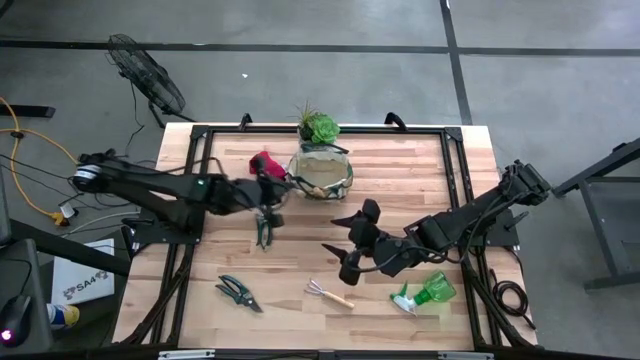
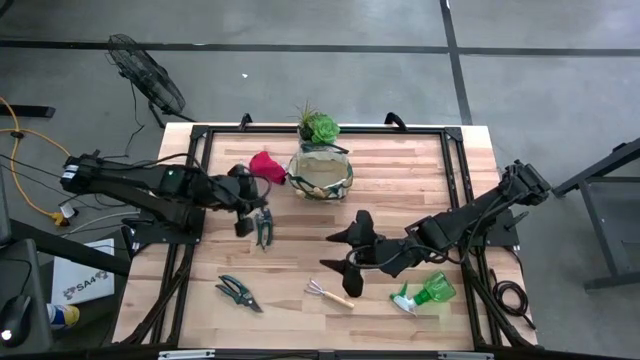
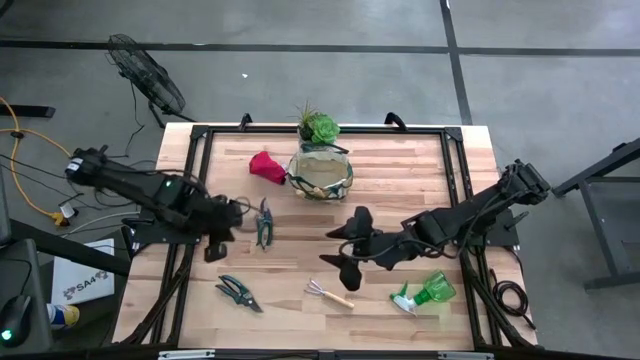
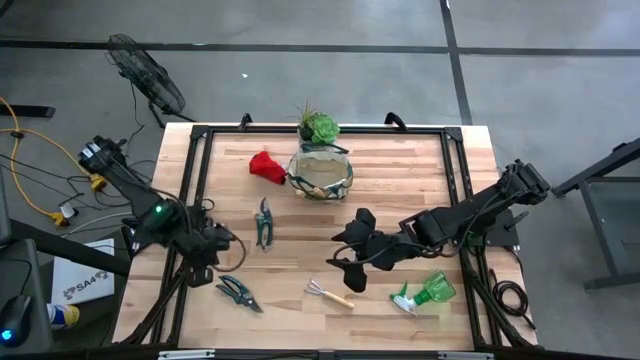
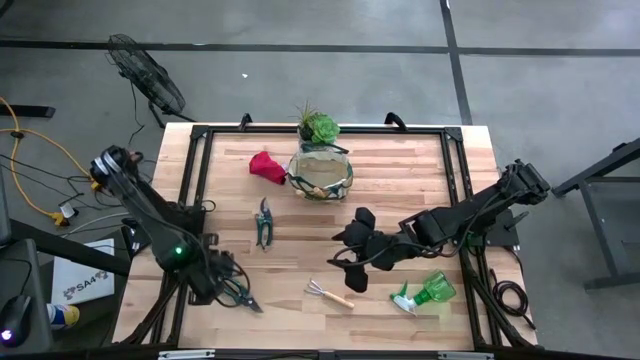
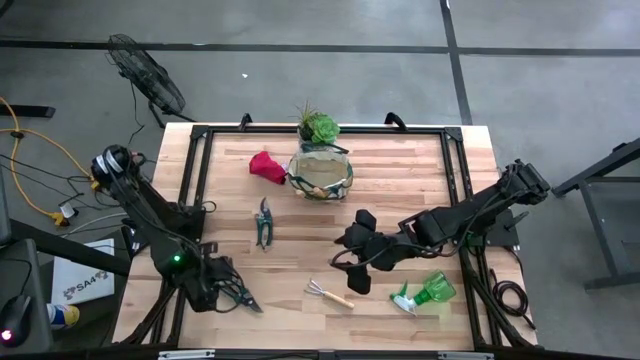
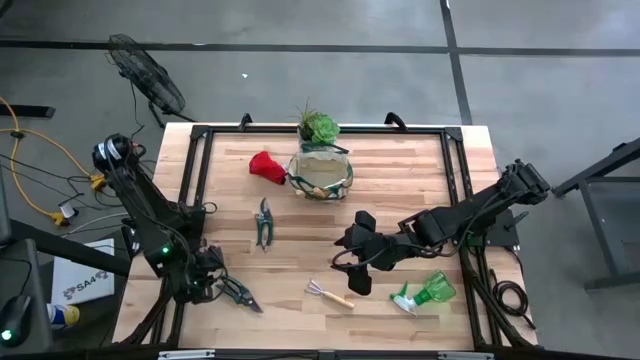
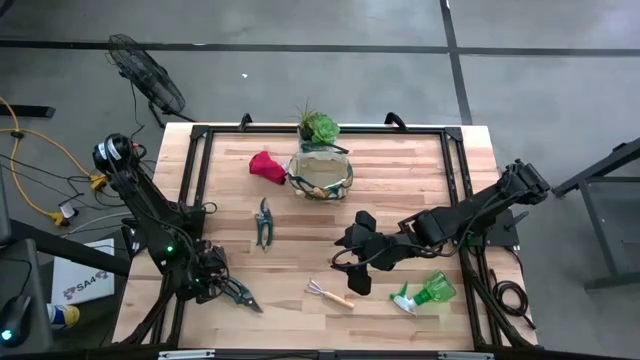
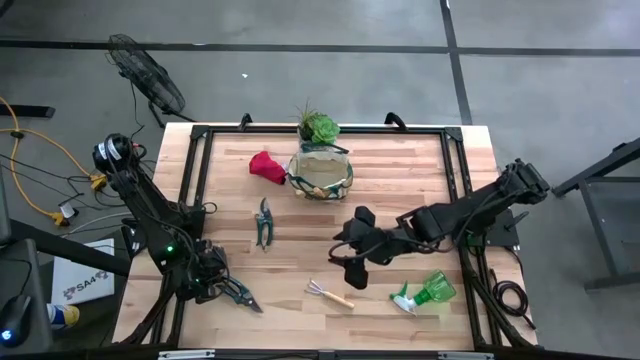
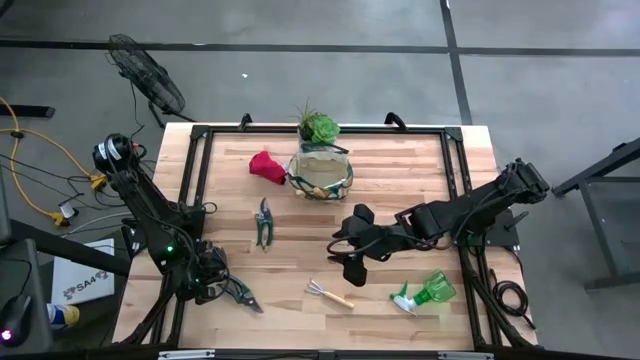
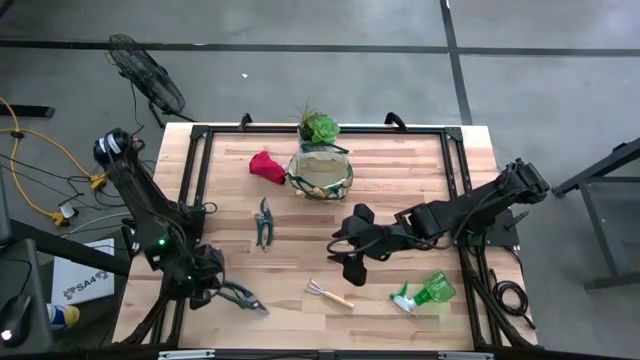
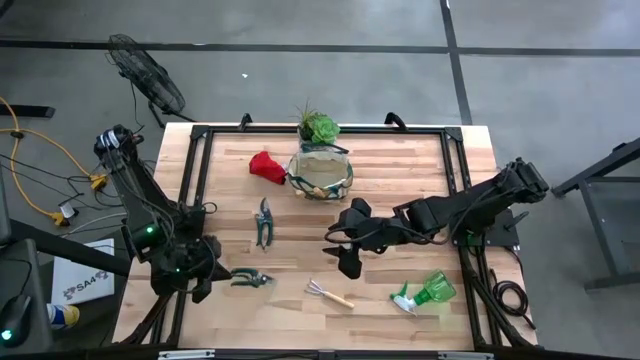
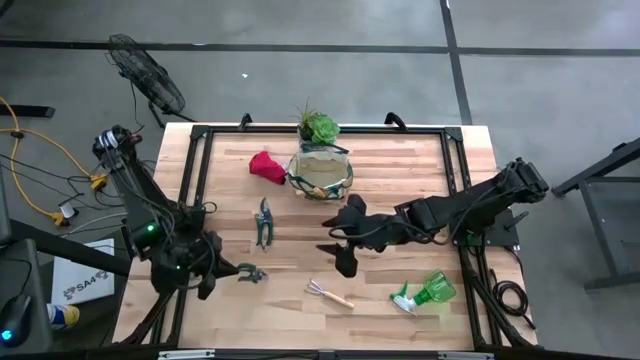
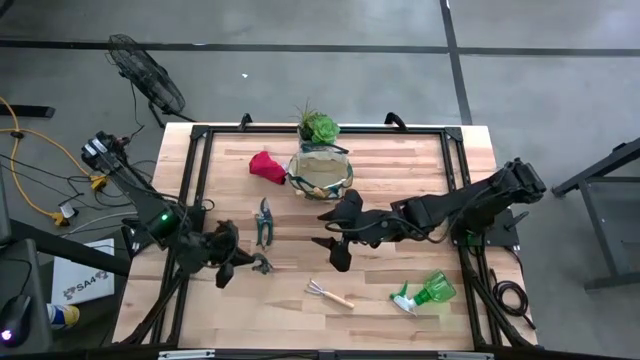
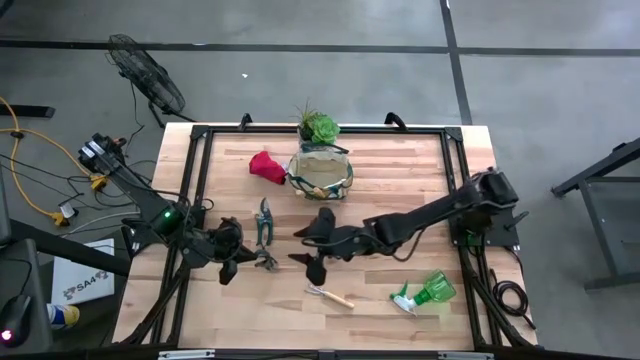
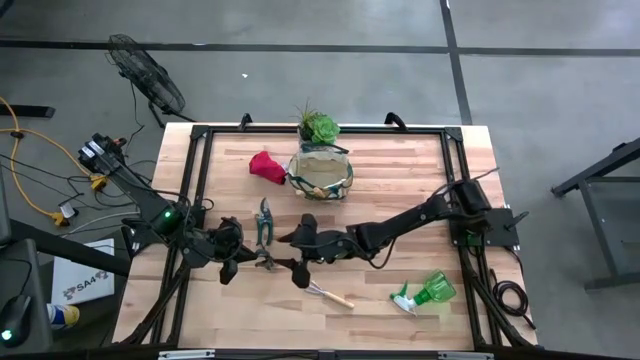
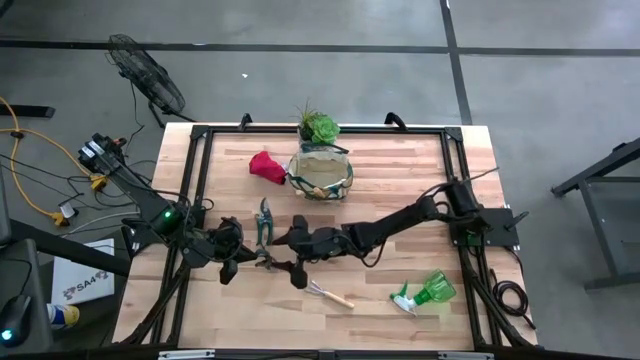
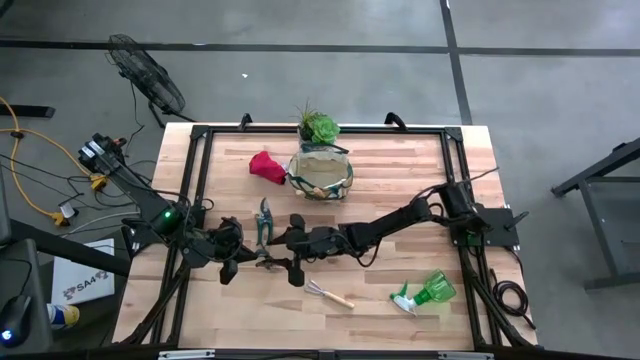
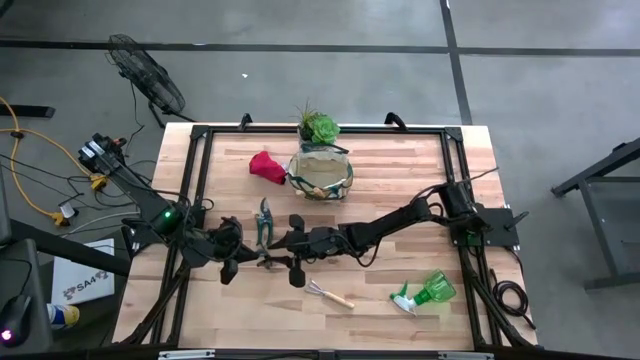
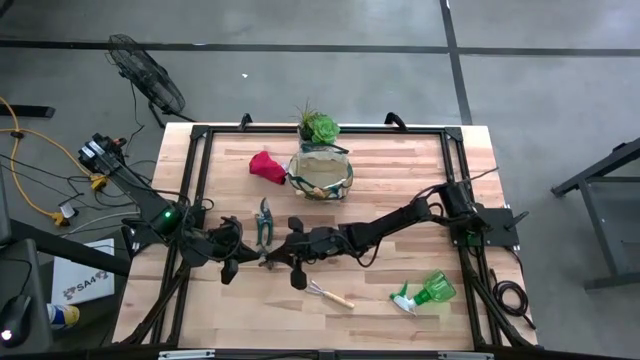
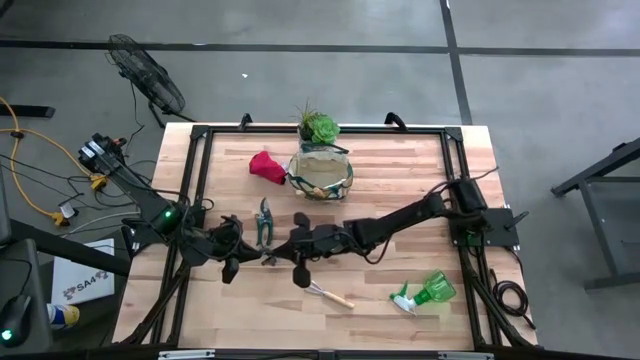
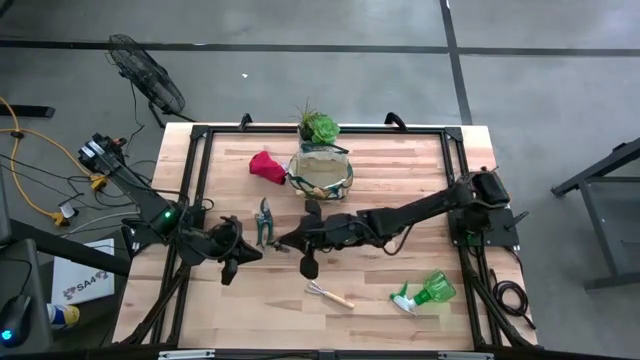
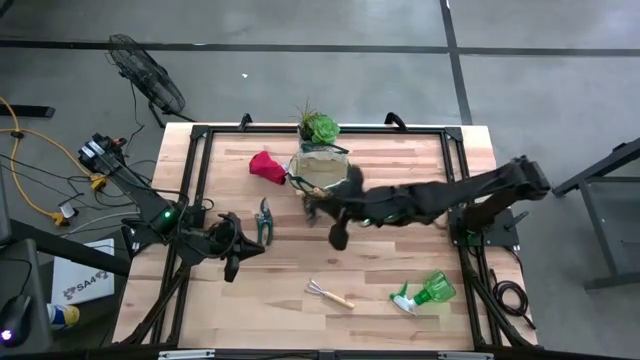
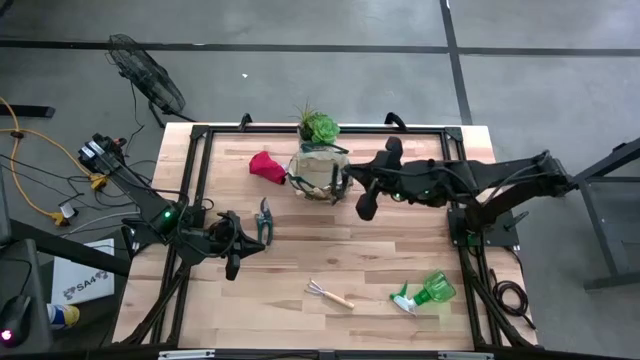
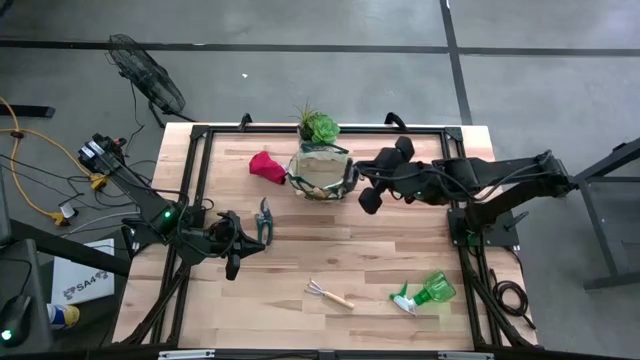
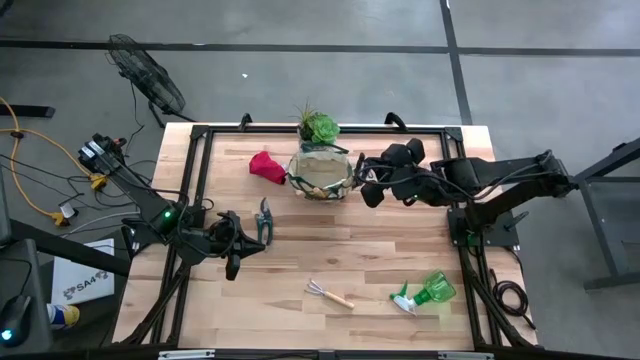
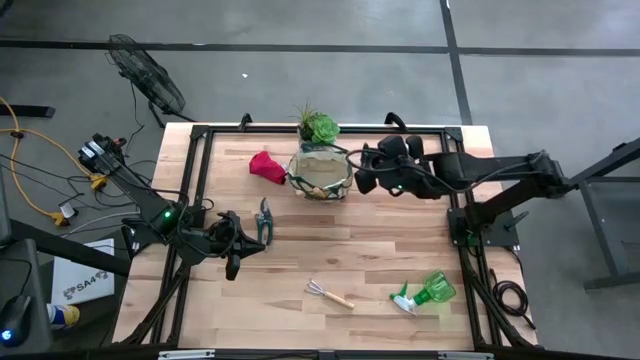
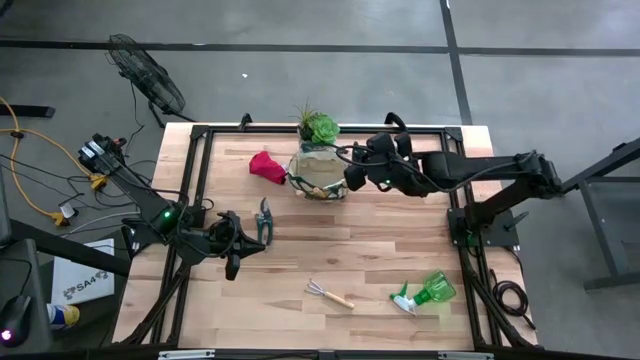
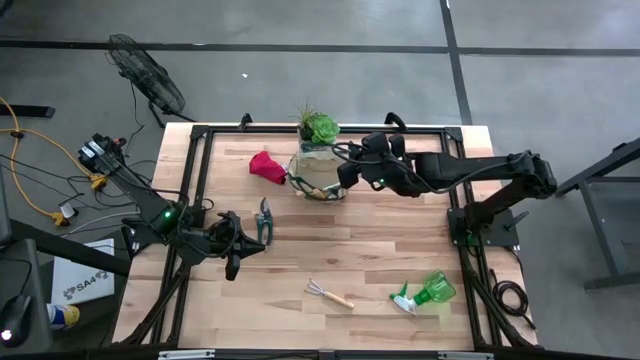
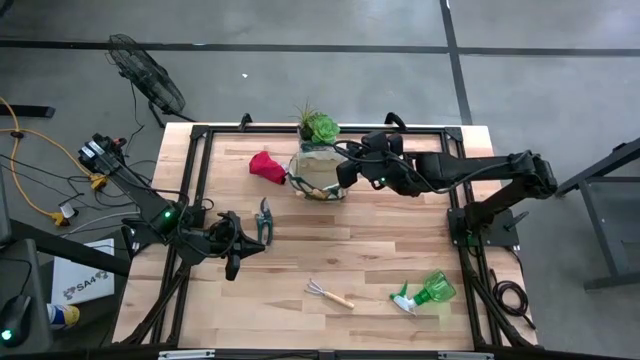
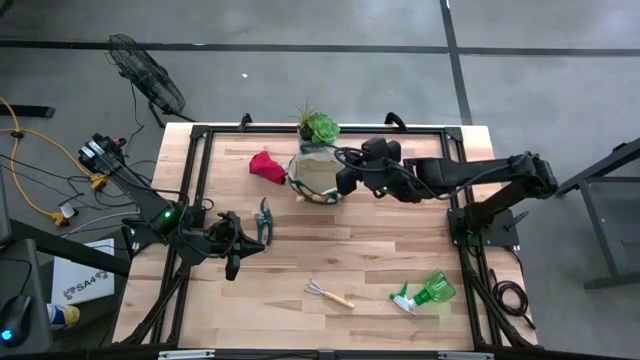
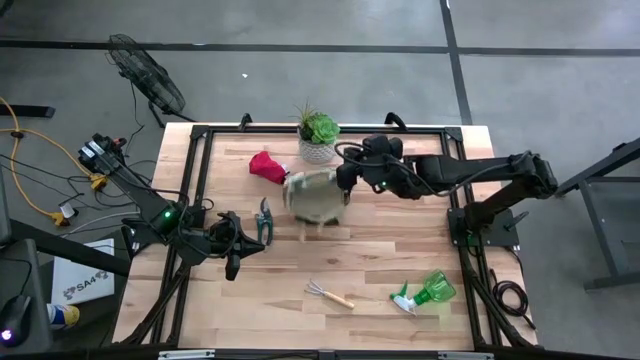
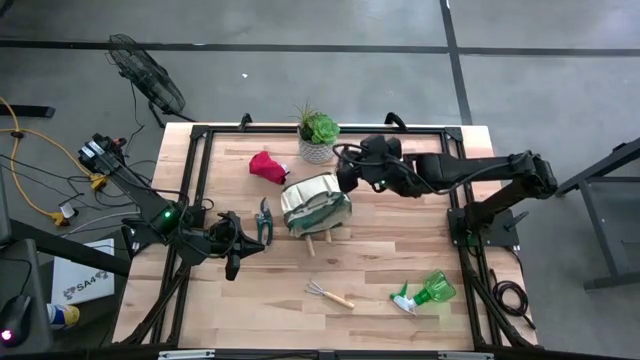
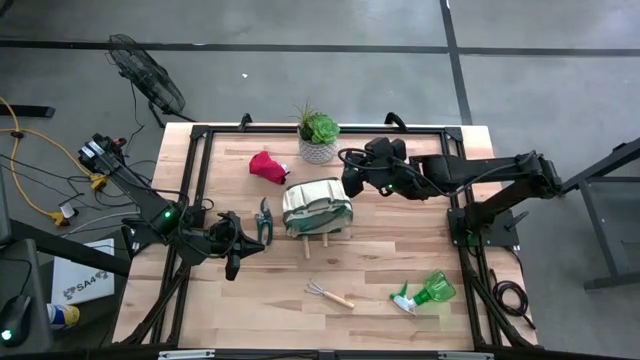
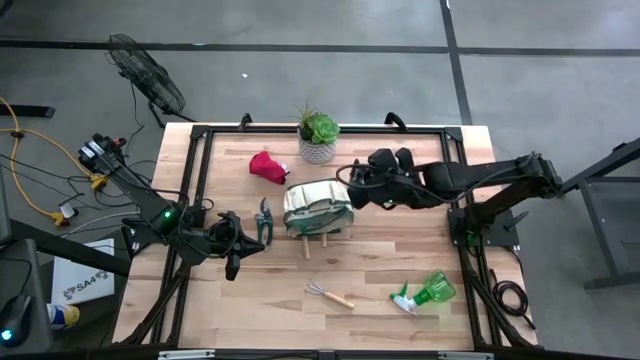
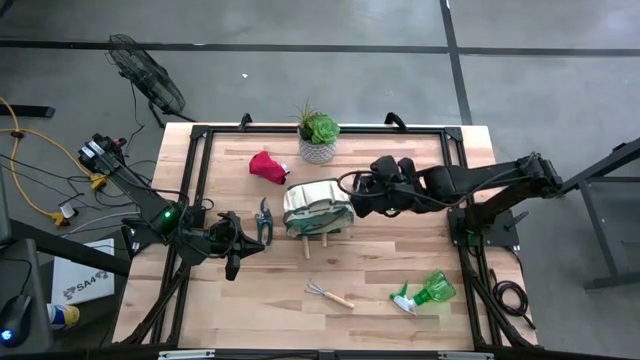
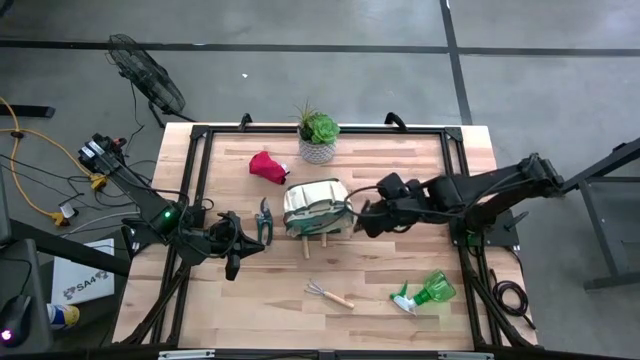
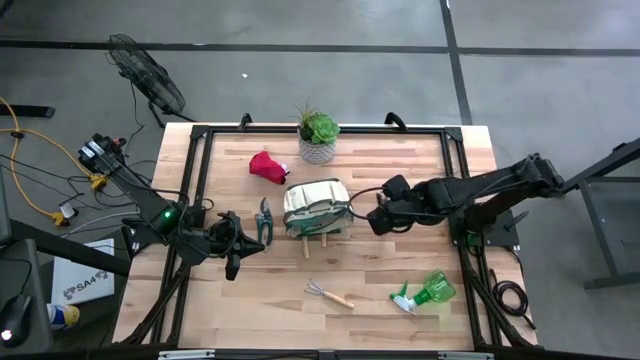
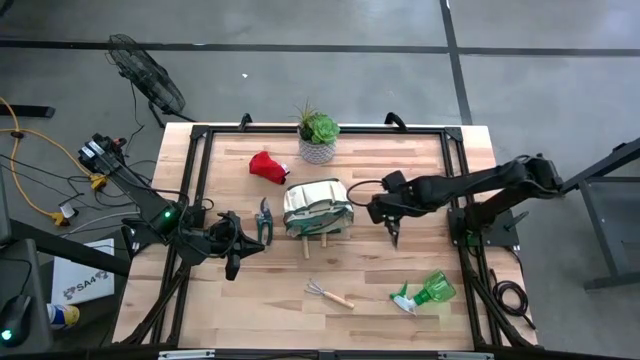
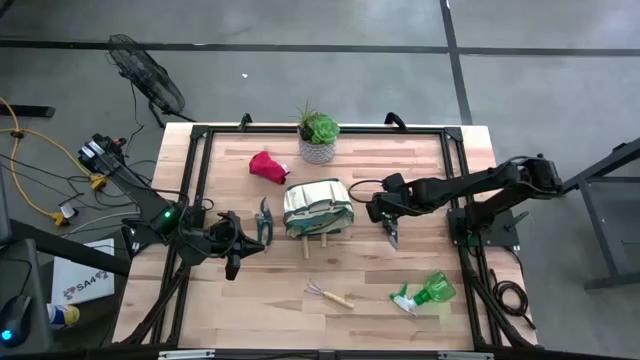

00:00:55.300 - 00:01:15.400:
Task: Pick & Place Garden tools in Gardening bag
Put the bottom green shear scissor into the gardening bag

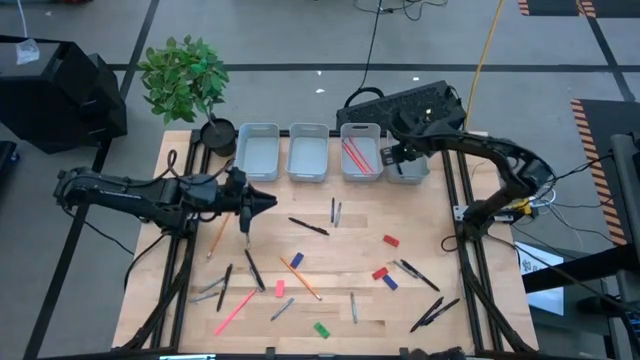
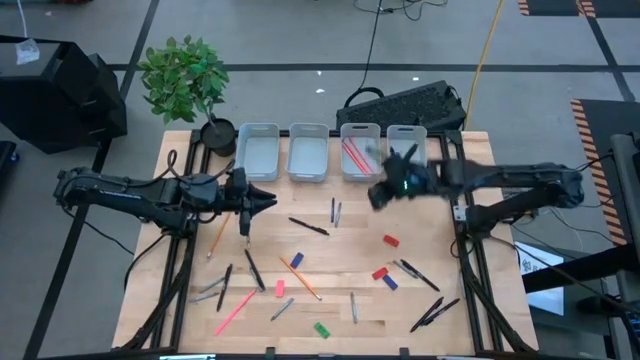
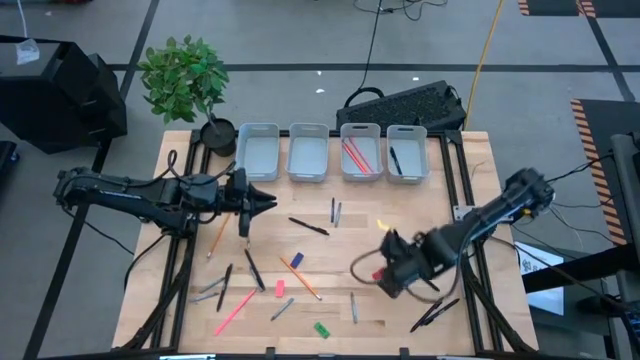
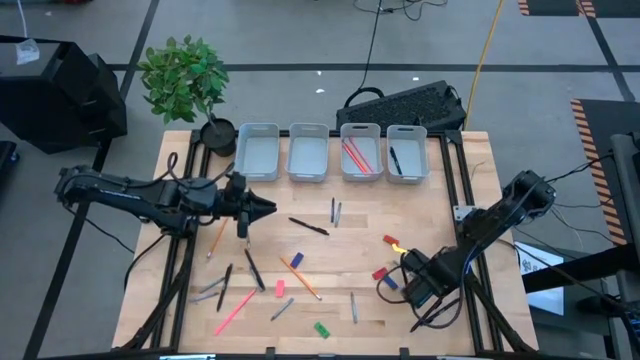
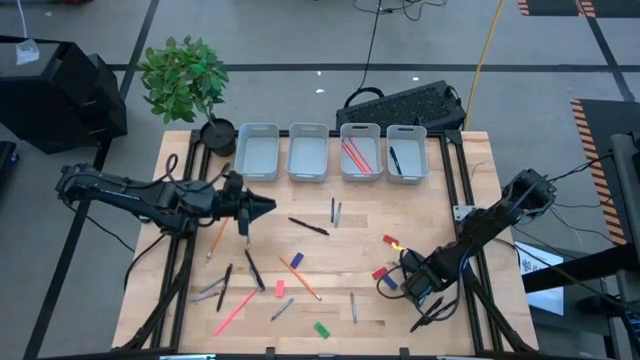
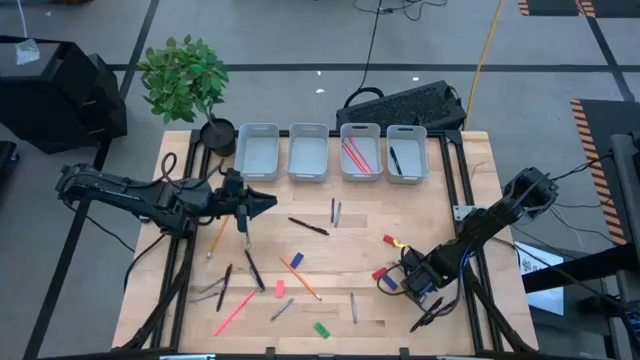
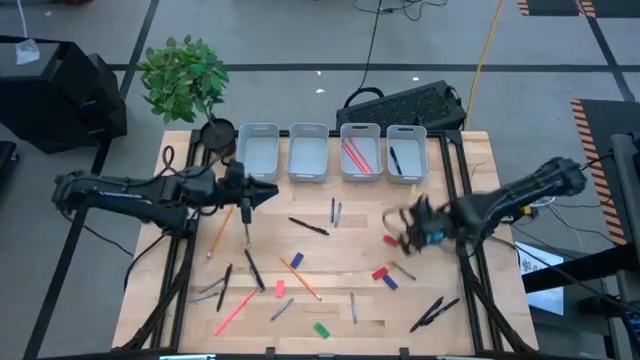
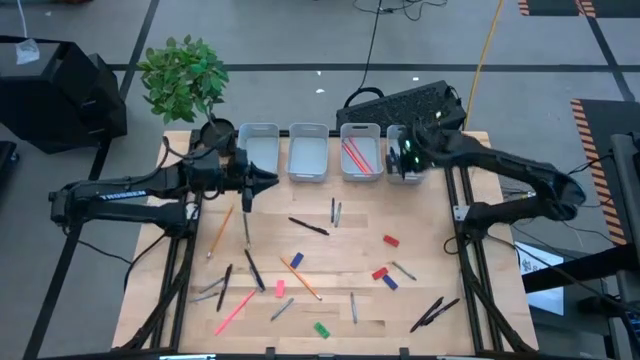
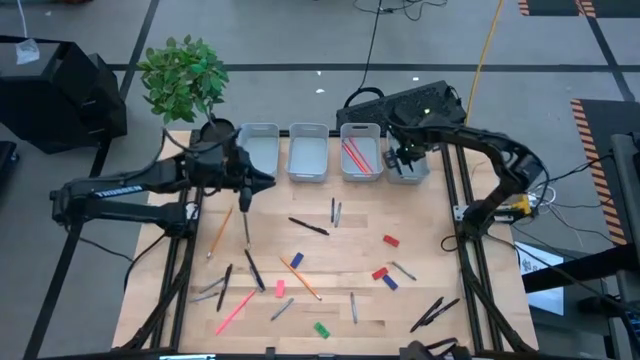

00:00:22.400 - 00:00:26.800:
Task: Sort crayons/erasers/pens/pencils in bins
Put the black pen into the top right gray bin
